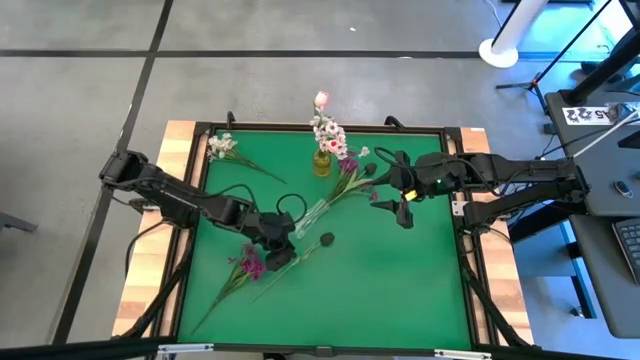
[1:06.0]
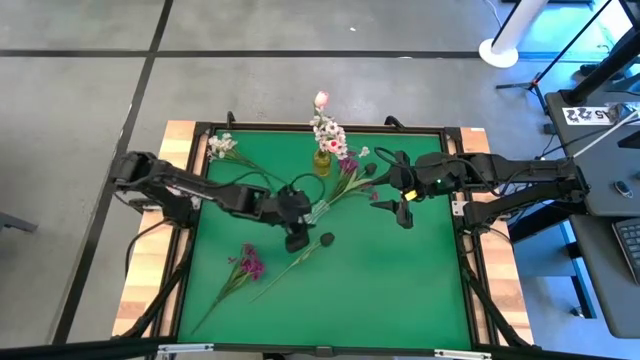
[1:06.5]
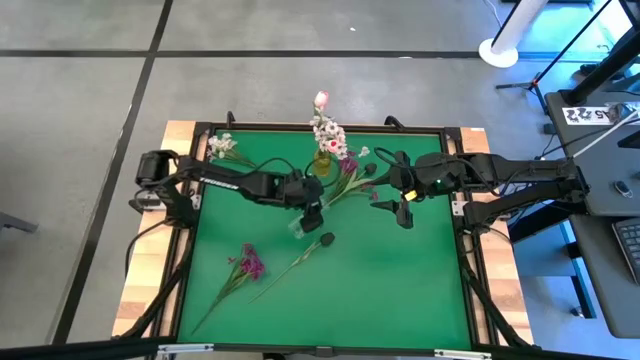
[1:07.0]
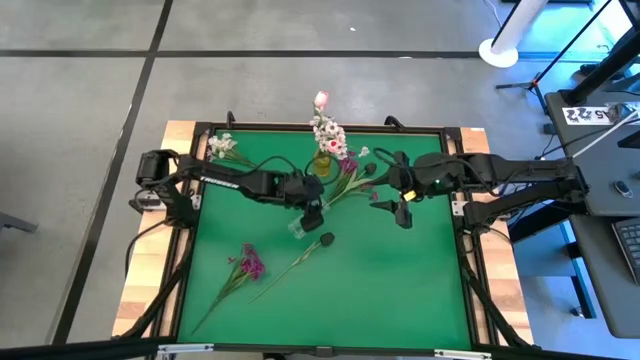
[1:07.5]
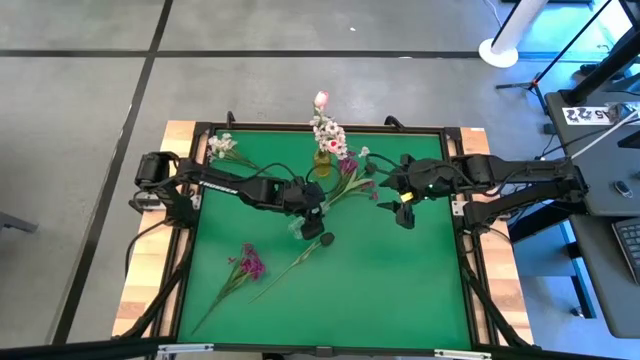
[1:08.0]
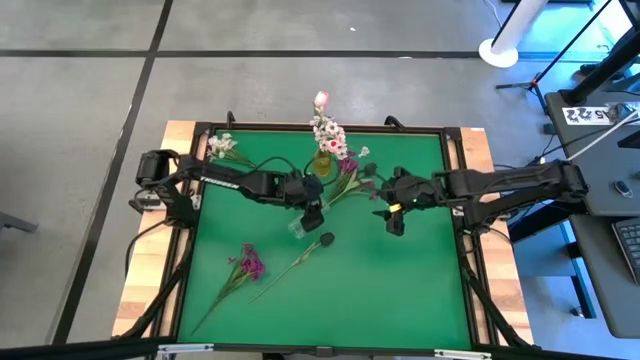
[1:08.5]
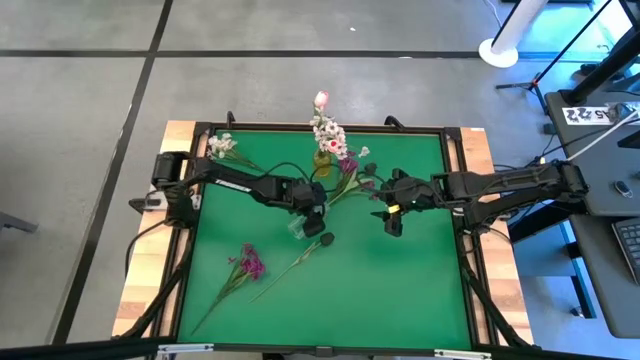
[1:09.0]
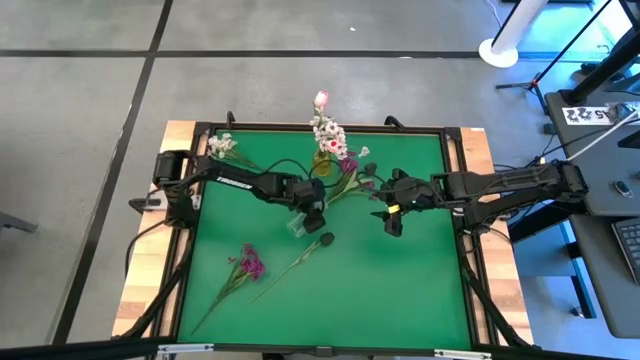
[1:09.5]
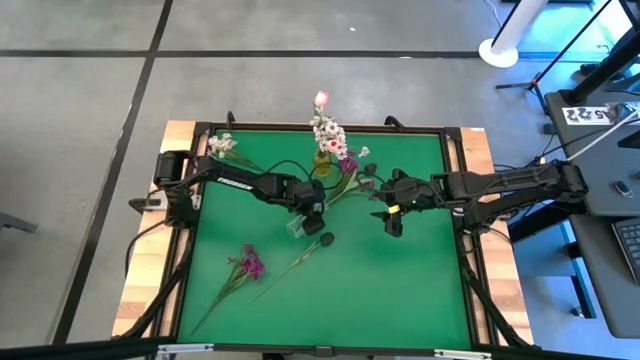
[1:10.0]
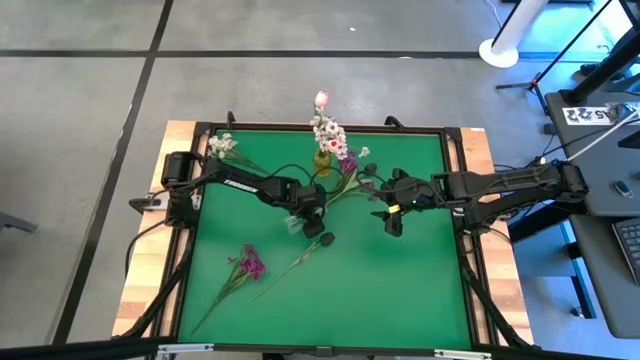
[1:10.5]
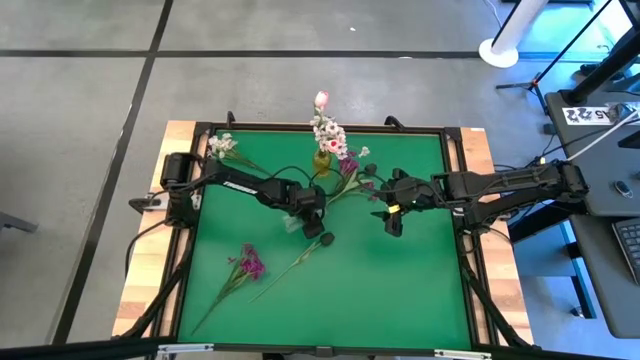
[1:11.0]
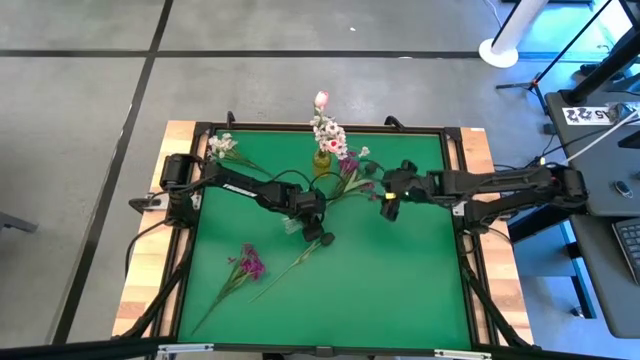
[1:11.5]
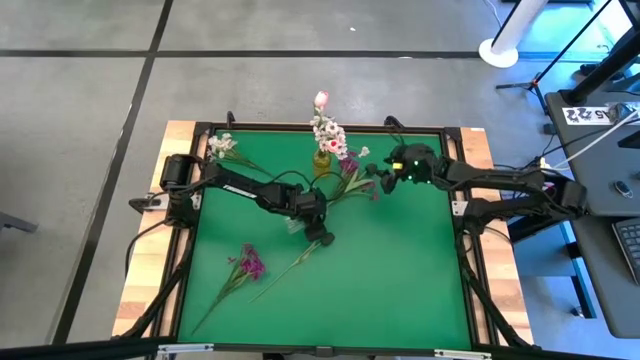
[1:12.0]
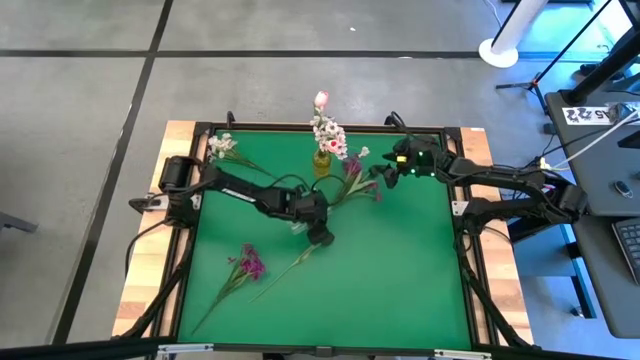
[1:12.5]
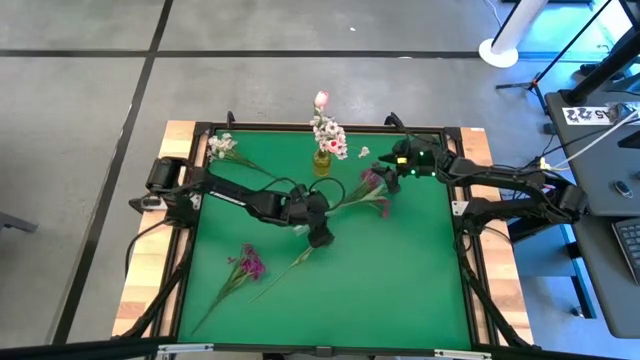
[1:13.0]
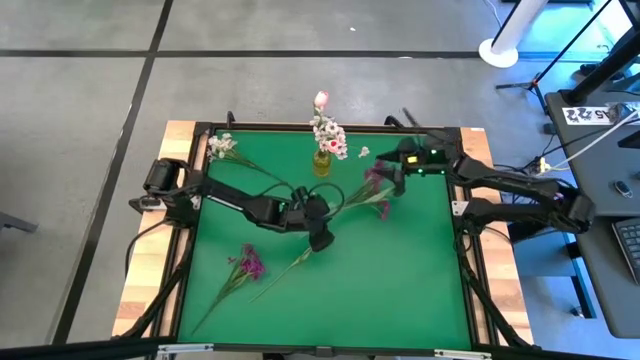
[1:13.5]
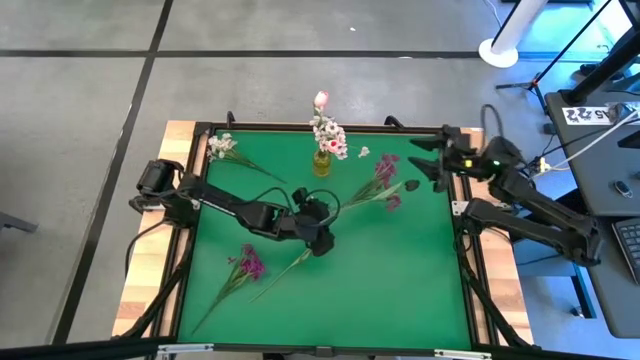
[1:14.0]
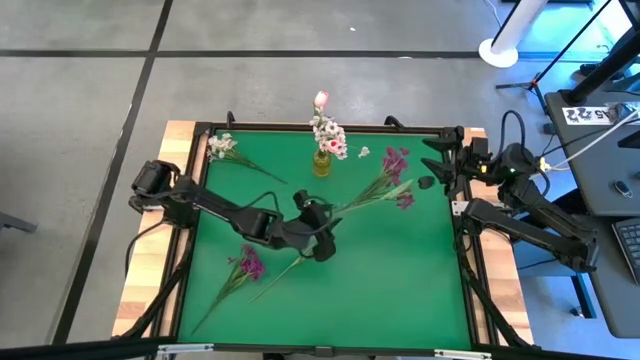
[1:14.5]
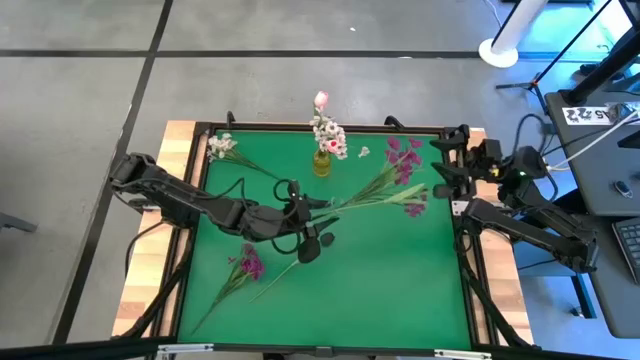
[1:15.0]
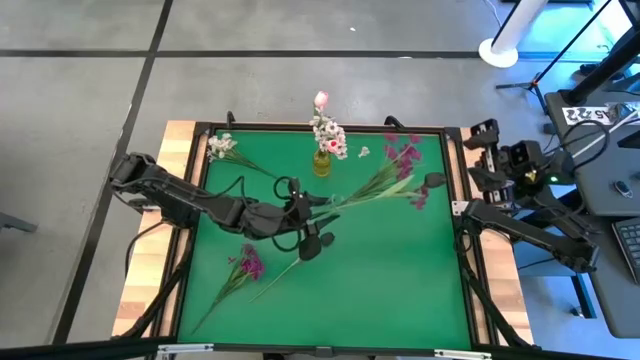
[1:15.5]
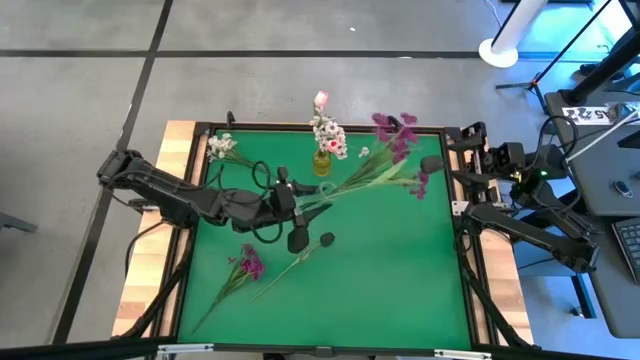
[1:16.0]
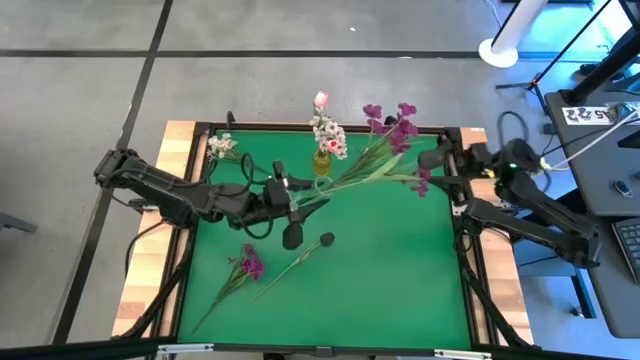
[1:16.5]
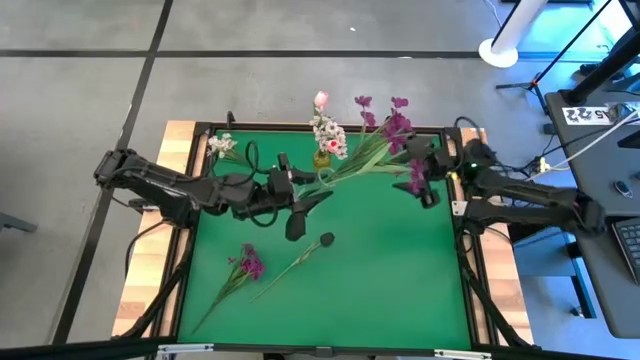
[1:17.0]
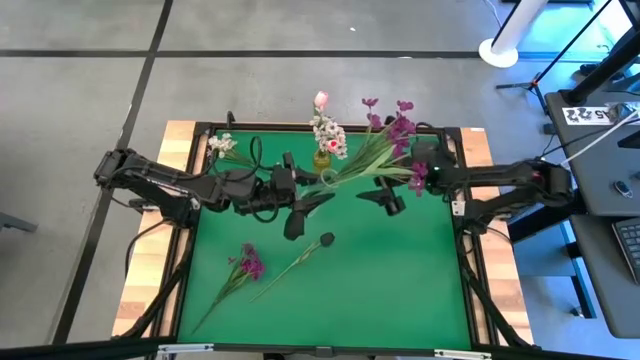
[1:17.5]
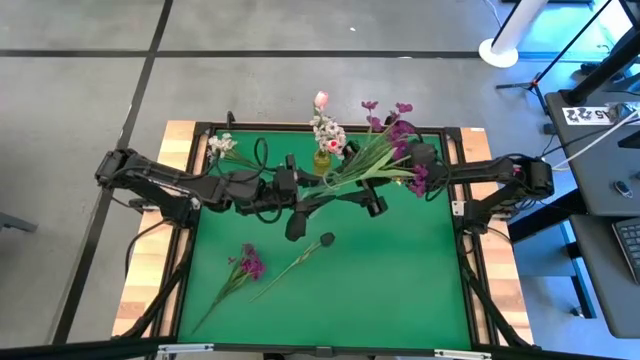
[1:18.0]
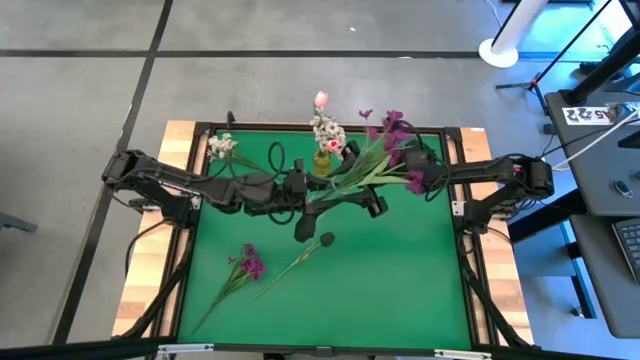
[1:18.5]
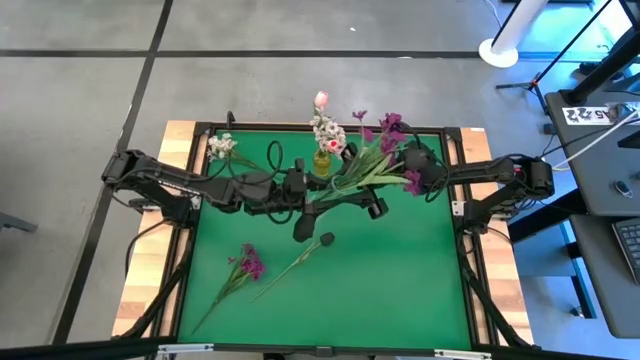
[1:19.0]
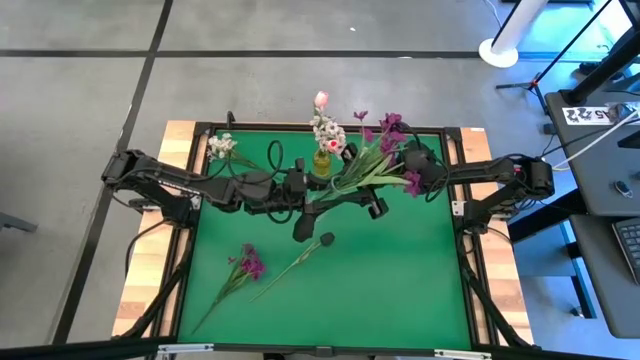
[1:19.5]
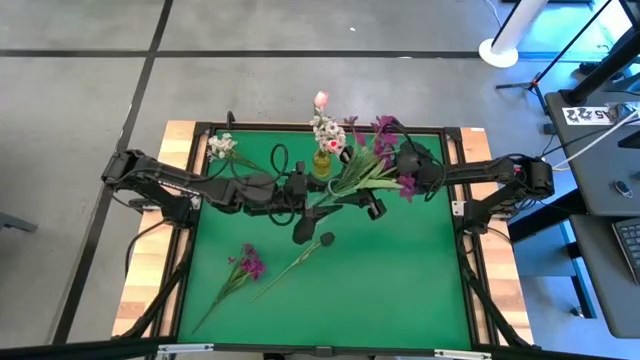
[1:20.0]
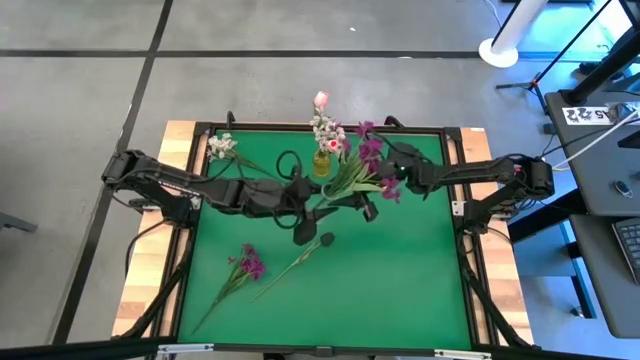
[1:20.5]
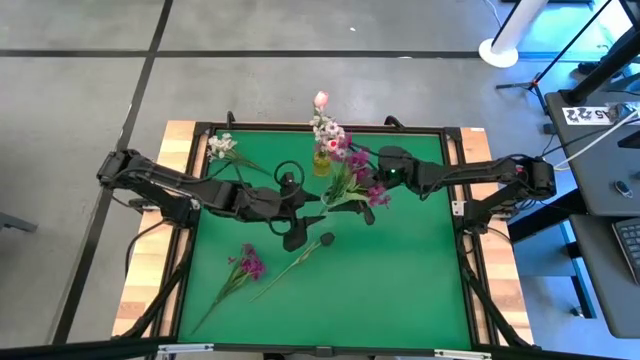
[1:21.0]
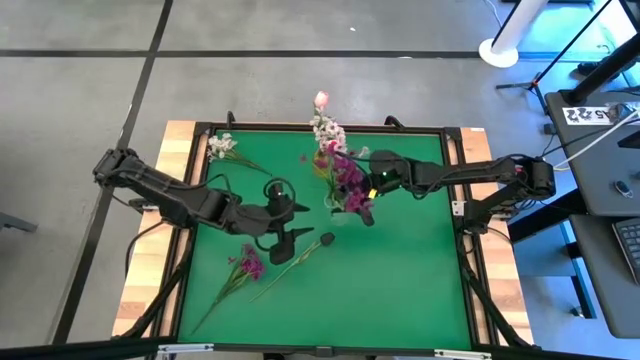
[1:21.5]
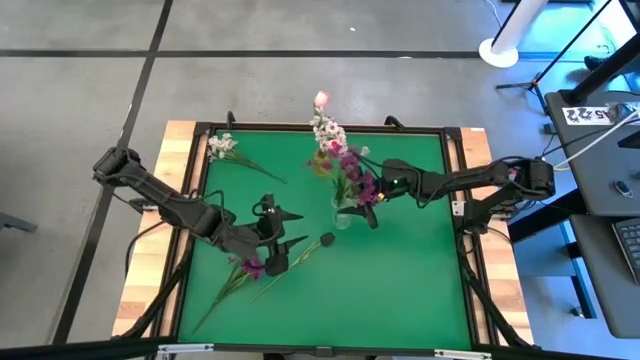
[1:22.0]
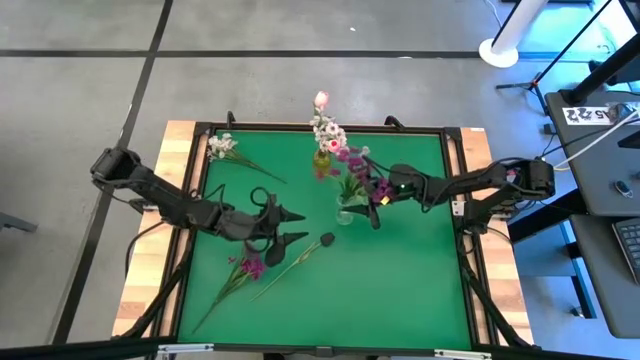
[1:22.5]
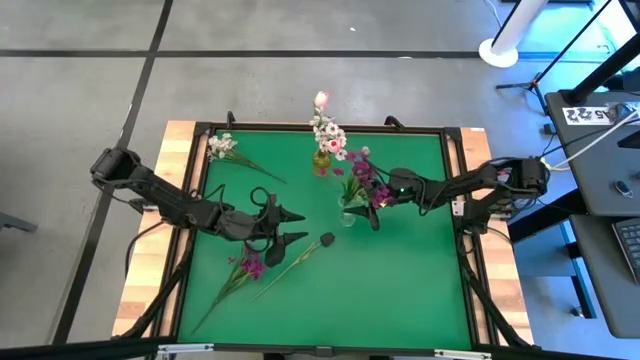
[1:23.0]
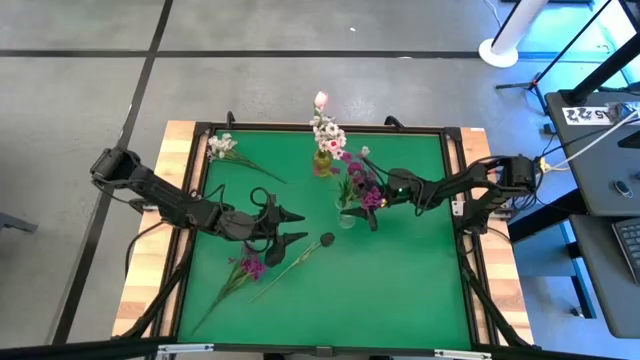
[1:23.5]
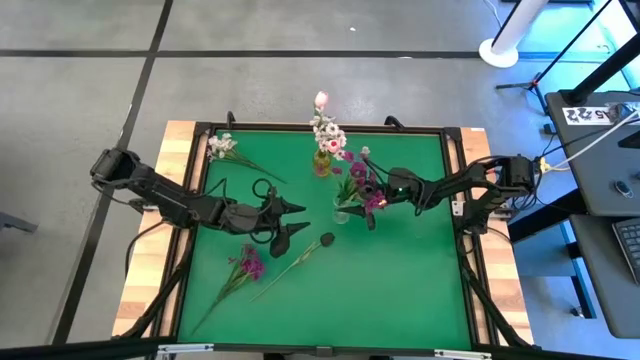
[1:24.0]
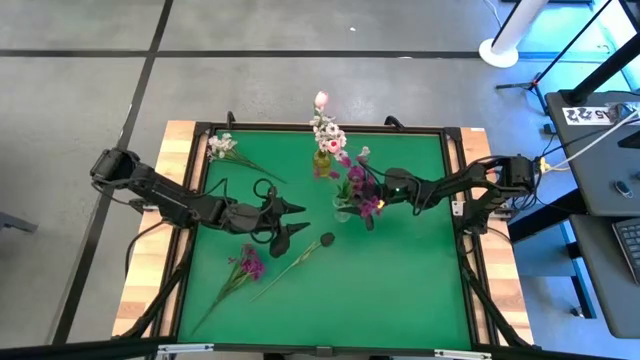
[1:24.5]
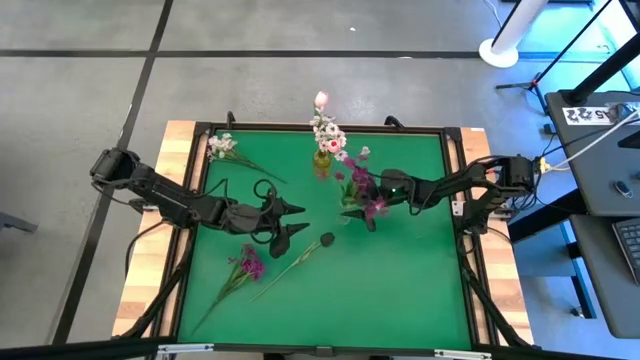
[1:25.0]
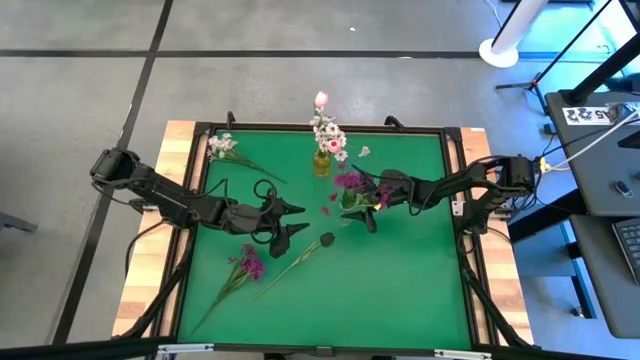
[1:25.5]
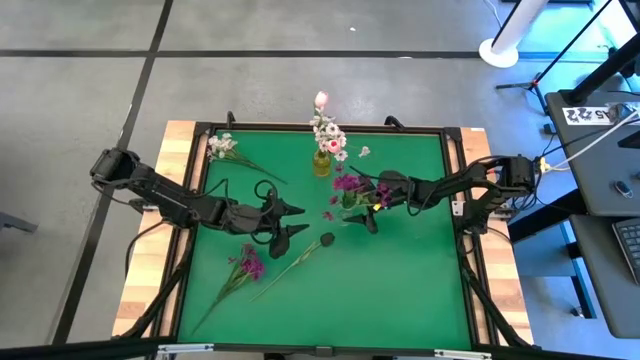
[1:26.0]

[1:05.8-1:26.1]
Task: Sort flowers into vase by color
Adjust the transparent vase to an upright position

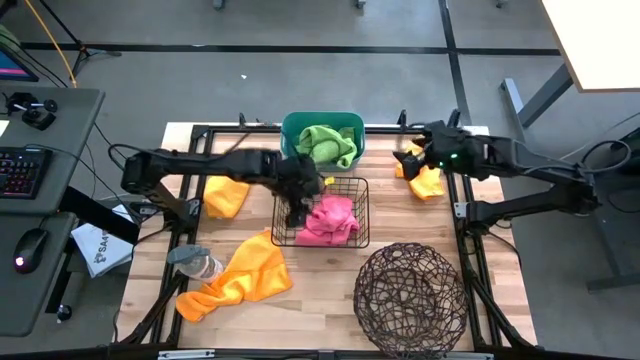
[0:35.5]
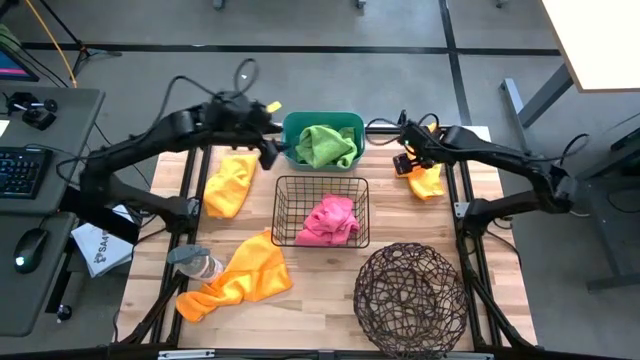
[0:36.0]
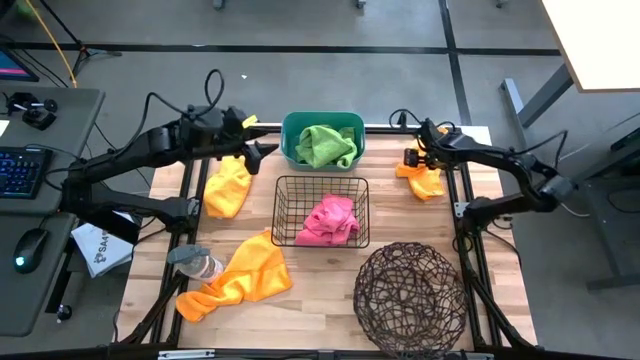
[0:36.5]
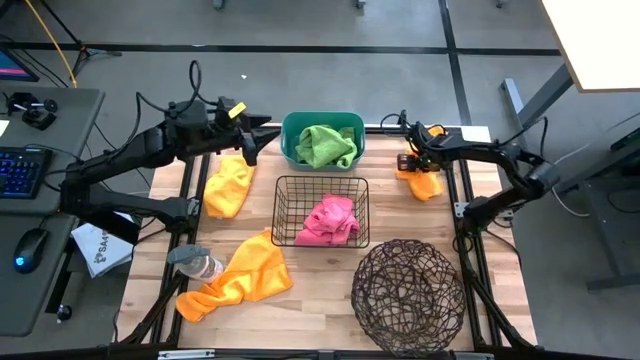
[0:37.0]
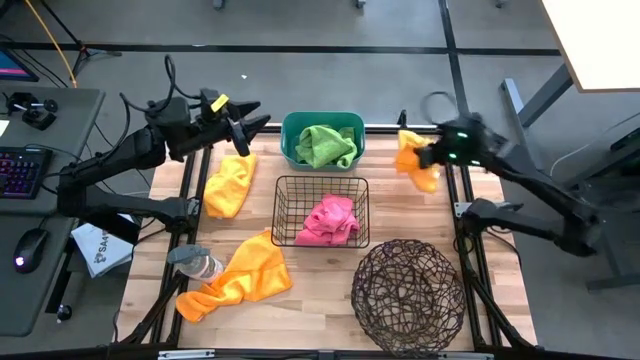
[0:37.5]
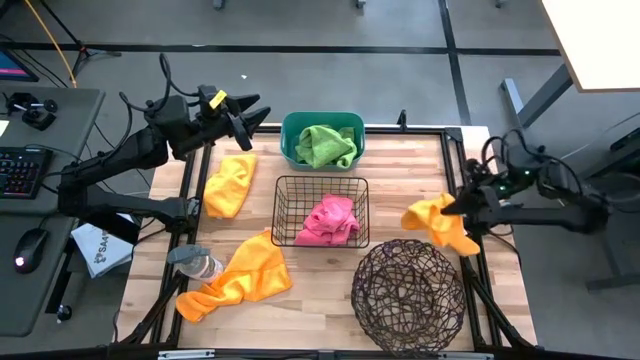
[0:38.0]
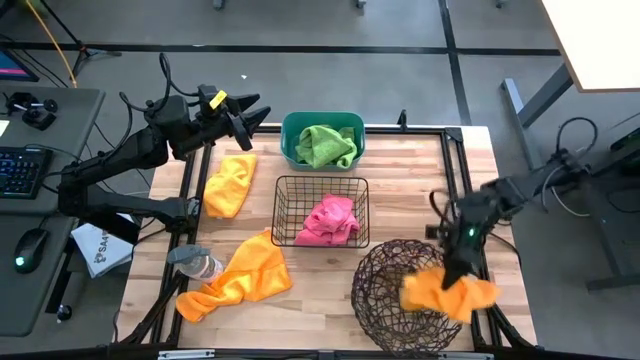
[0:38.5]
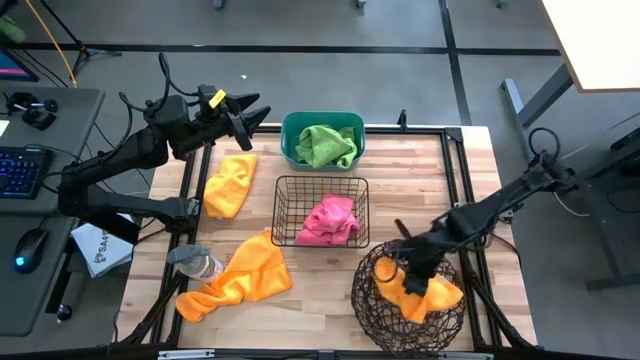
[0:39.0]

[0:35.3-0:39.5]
Task: Sort microfiber towel by color & place in baskets
Put the right yellow microfiber cloth into the spiral wire basket
